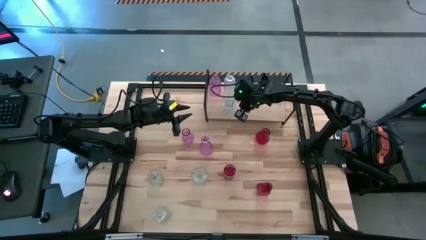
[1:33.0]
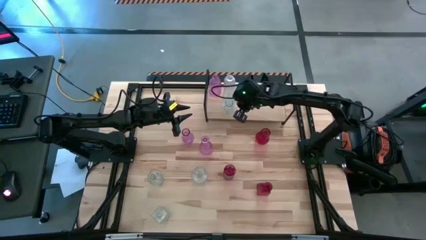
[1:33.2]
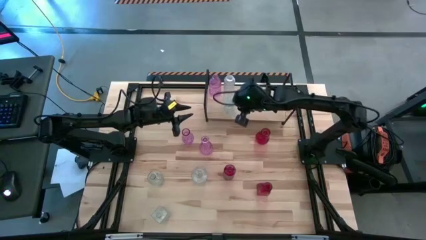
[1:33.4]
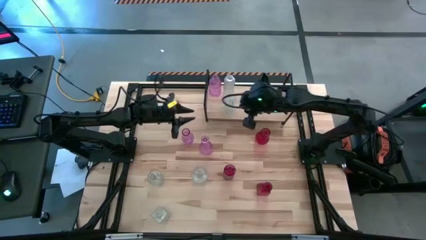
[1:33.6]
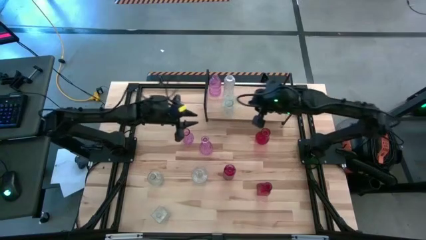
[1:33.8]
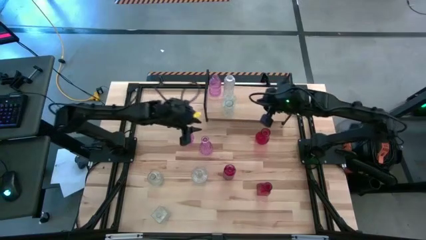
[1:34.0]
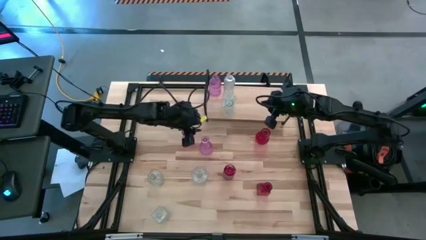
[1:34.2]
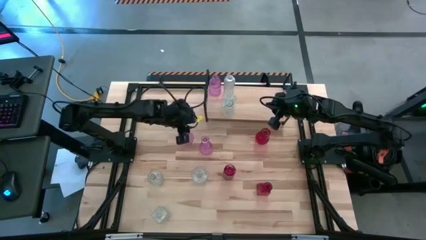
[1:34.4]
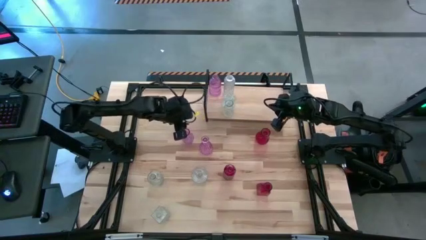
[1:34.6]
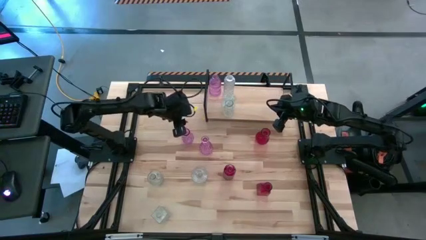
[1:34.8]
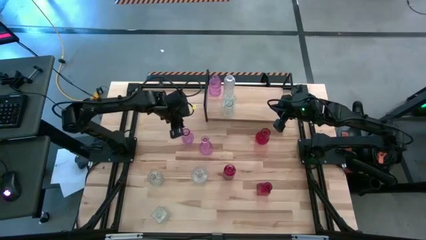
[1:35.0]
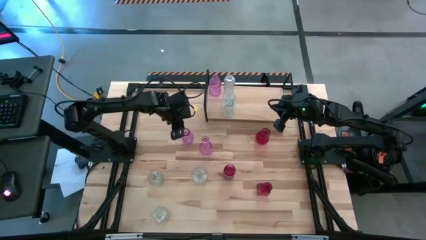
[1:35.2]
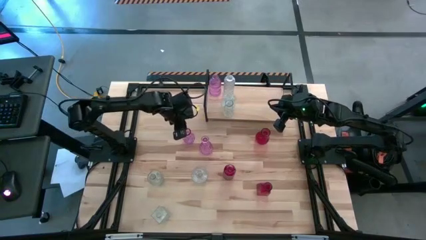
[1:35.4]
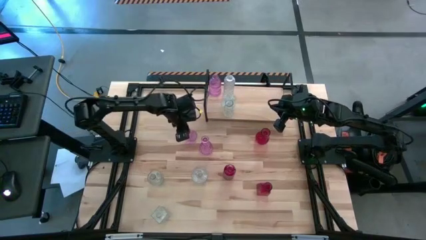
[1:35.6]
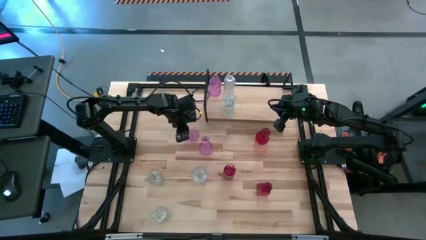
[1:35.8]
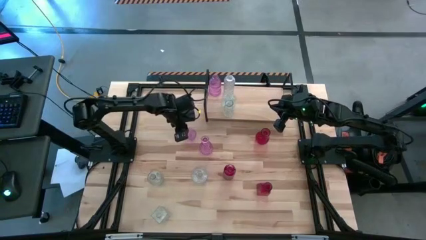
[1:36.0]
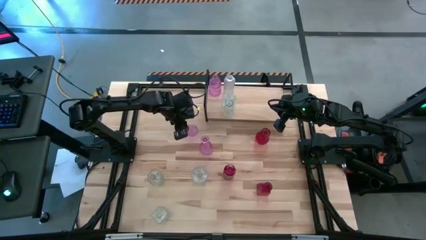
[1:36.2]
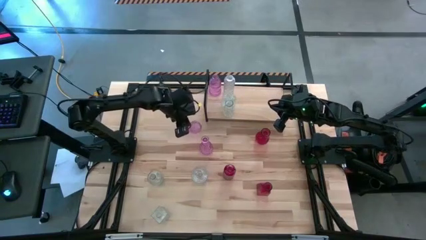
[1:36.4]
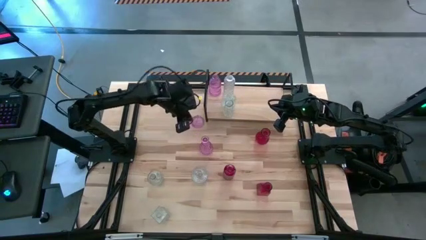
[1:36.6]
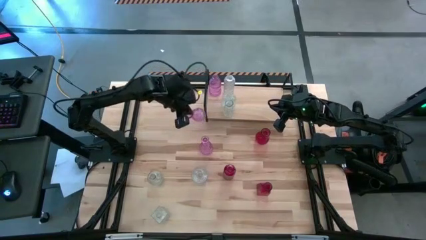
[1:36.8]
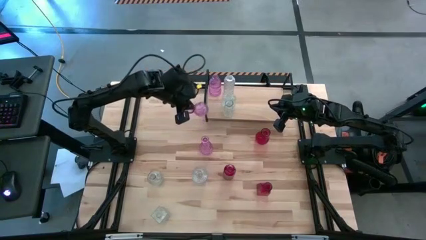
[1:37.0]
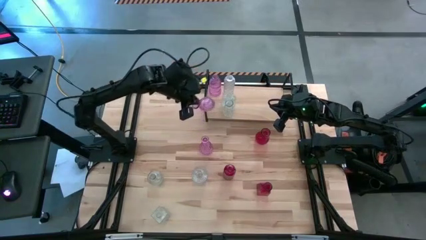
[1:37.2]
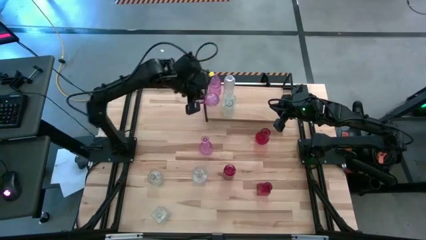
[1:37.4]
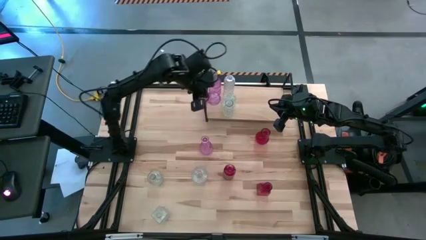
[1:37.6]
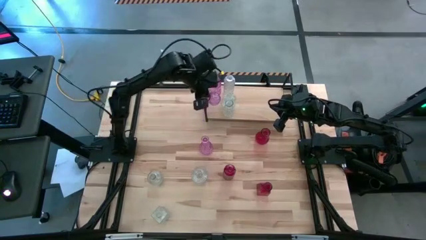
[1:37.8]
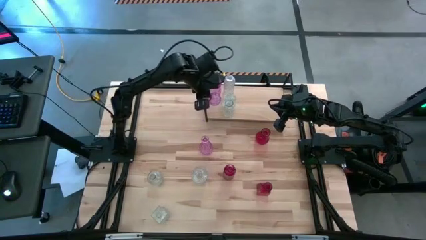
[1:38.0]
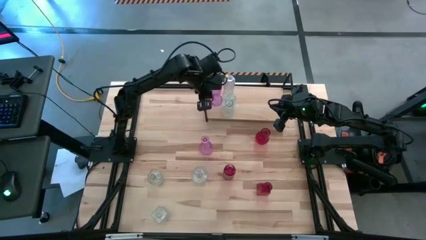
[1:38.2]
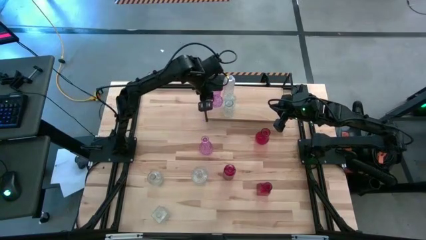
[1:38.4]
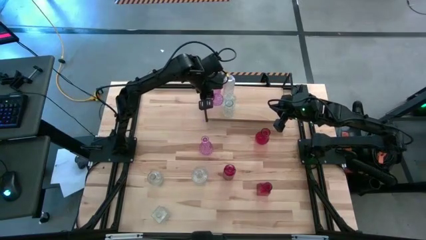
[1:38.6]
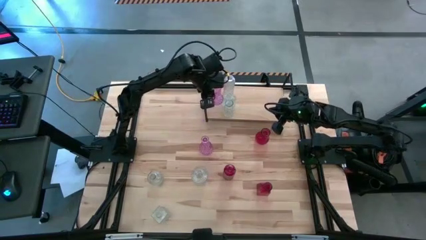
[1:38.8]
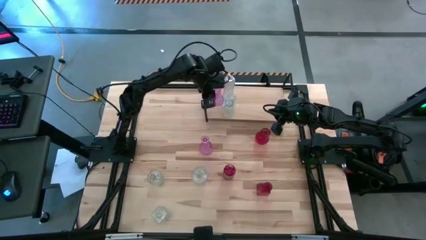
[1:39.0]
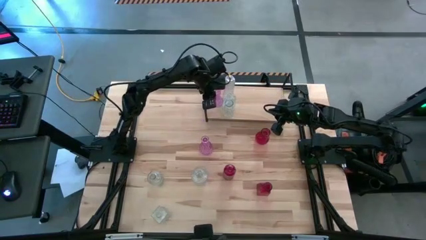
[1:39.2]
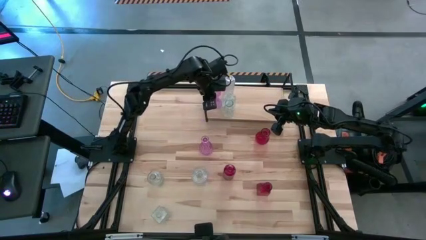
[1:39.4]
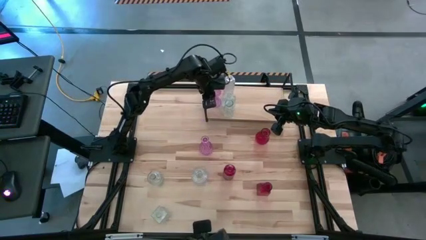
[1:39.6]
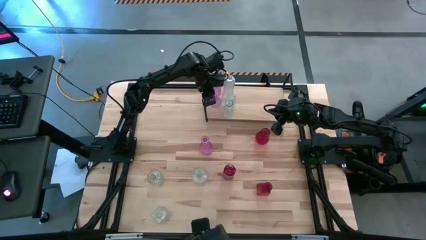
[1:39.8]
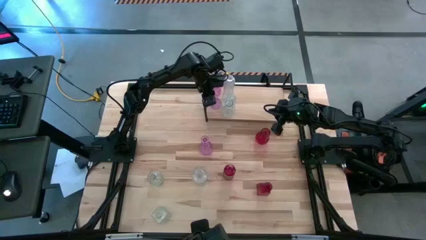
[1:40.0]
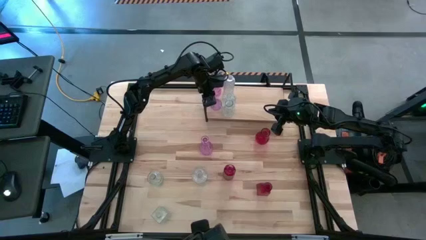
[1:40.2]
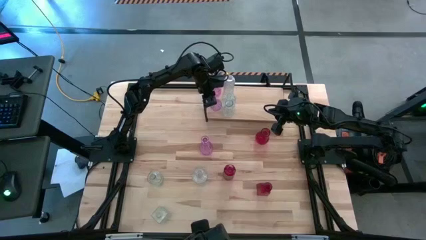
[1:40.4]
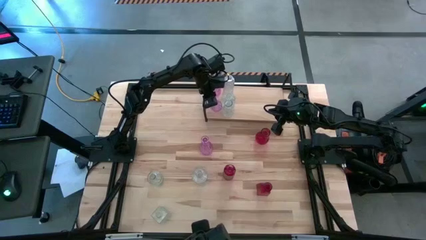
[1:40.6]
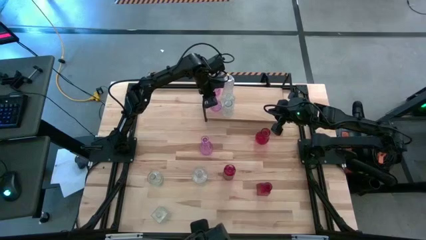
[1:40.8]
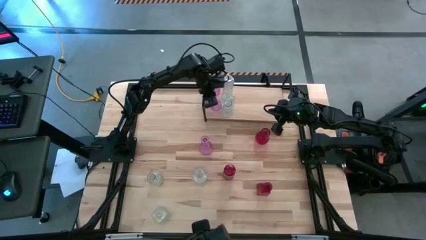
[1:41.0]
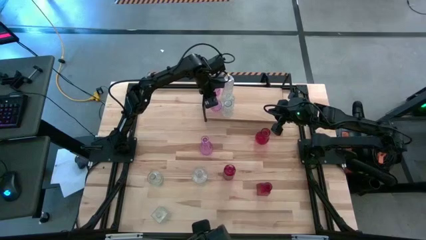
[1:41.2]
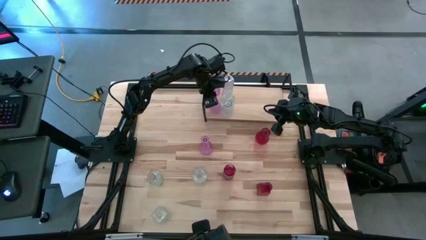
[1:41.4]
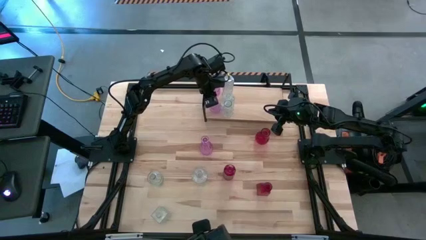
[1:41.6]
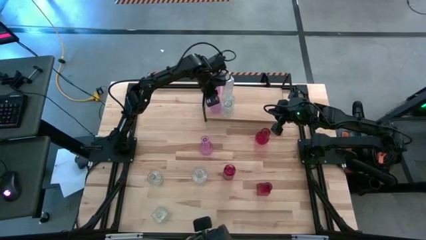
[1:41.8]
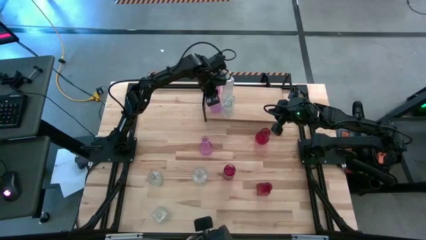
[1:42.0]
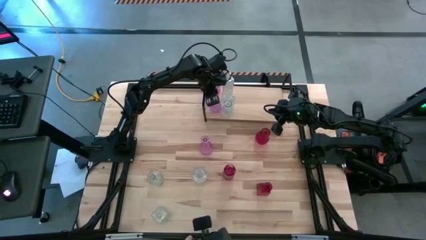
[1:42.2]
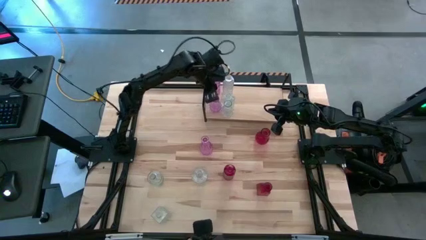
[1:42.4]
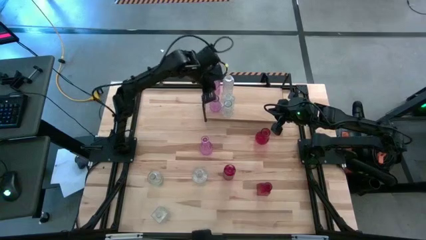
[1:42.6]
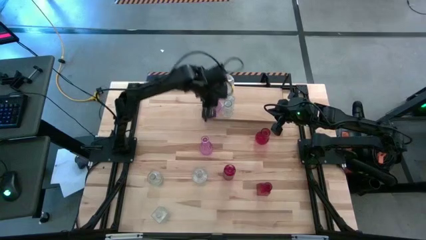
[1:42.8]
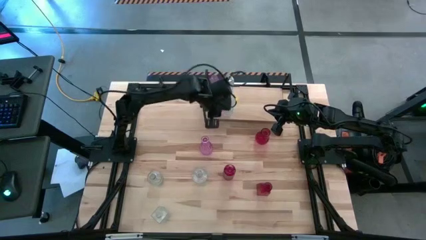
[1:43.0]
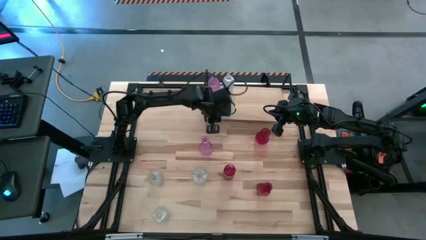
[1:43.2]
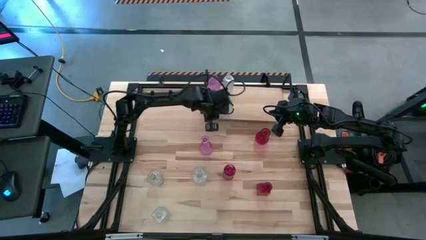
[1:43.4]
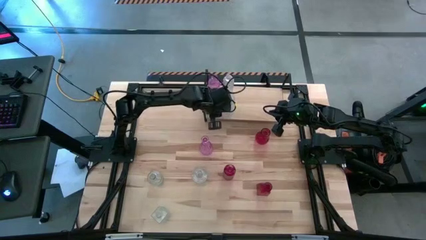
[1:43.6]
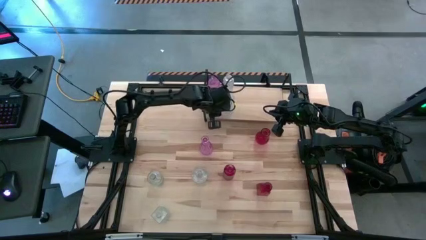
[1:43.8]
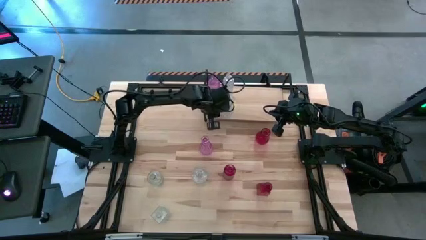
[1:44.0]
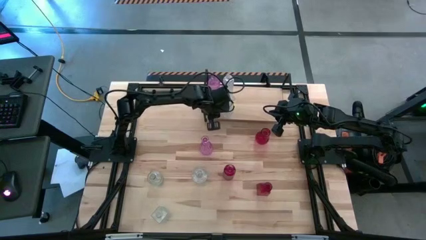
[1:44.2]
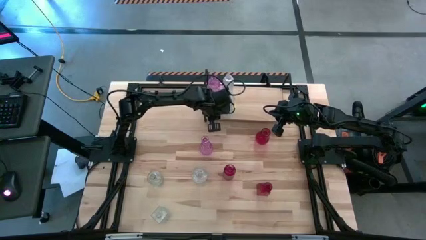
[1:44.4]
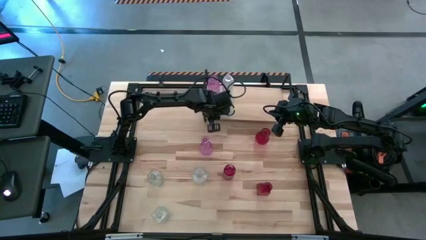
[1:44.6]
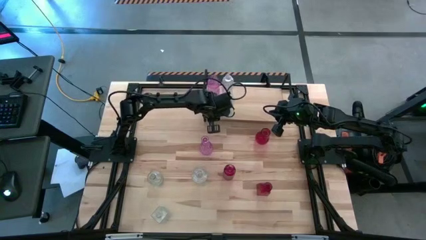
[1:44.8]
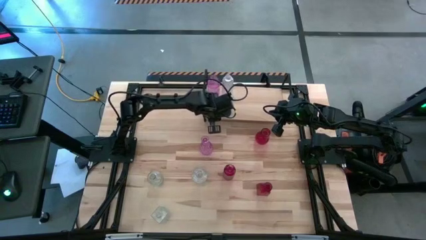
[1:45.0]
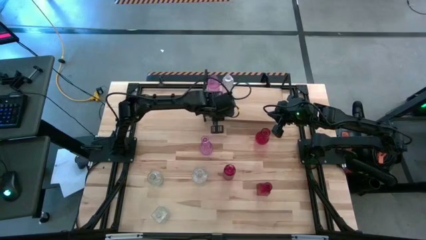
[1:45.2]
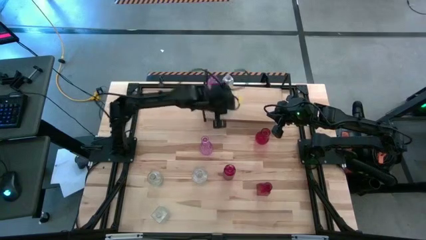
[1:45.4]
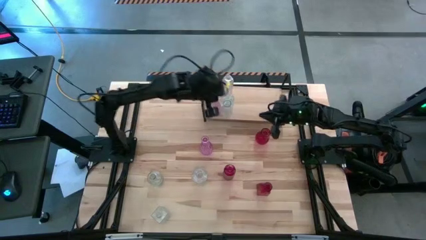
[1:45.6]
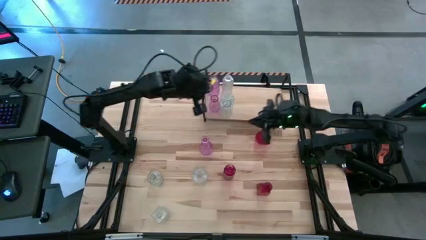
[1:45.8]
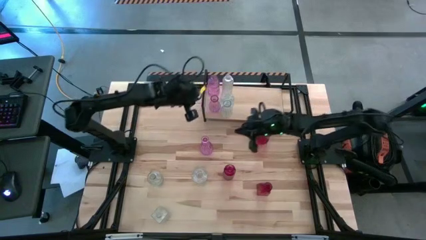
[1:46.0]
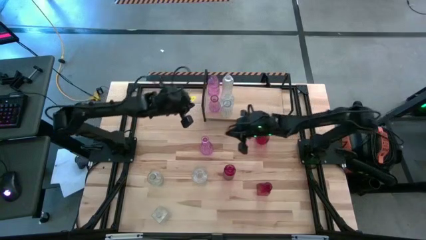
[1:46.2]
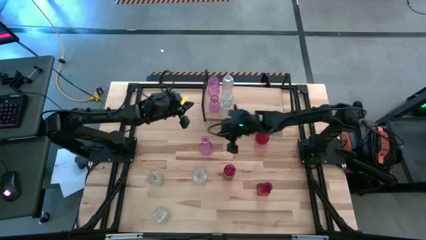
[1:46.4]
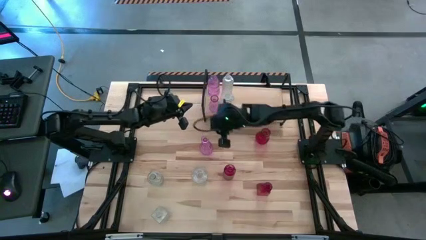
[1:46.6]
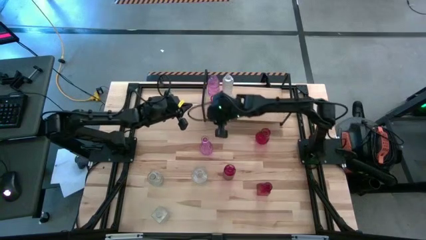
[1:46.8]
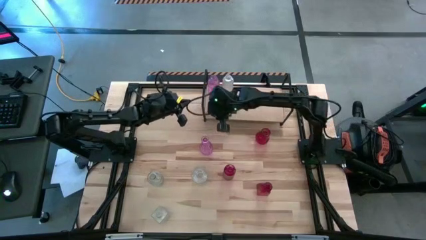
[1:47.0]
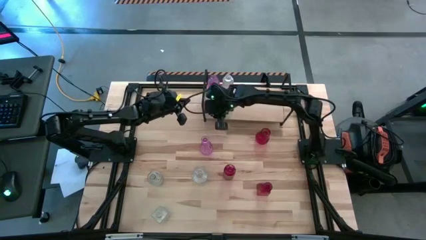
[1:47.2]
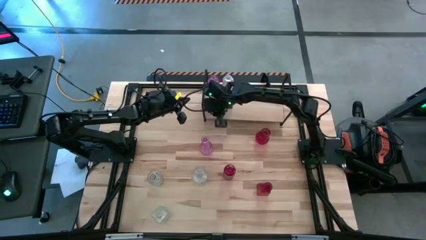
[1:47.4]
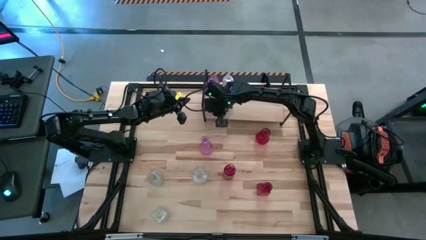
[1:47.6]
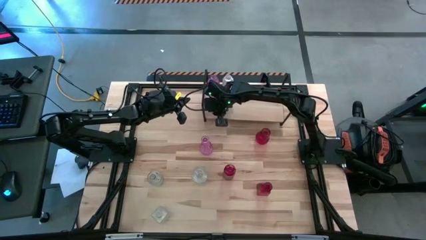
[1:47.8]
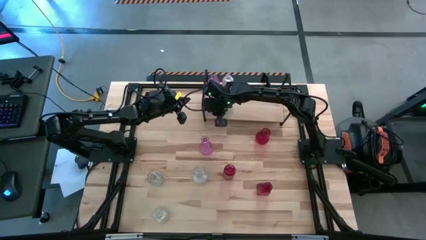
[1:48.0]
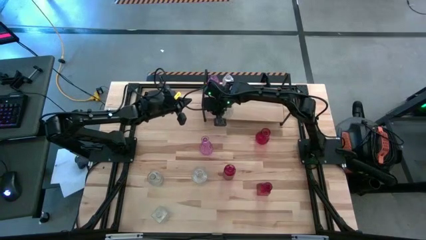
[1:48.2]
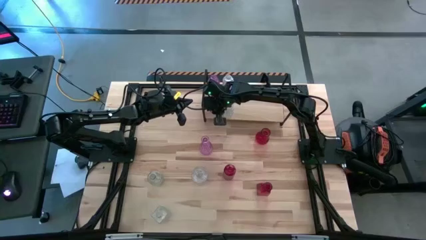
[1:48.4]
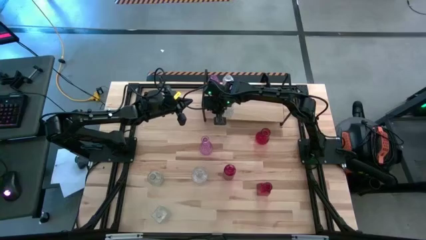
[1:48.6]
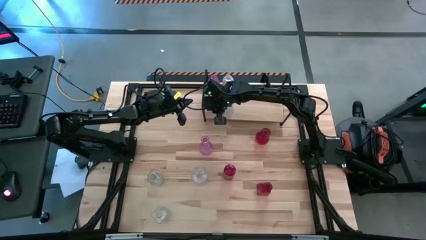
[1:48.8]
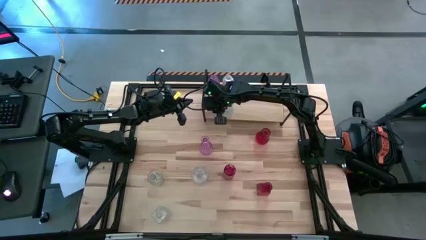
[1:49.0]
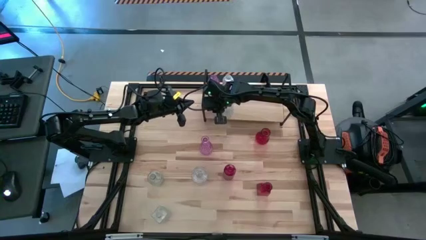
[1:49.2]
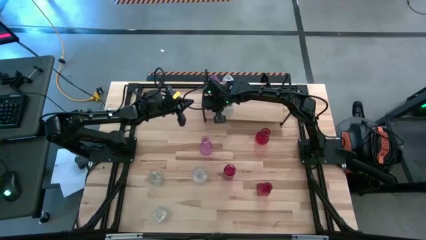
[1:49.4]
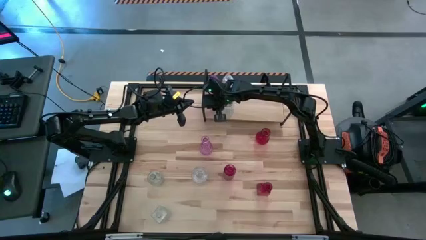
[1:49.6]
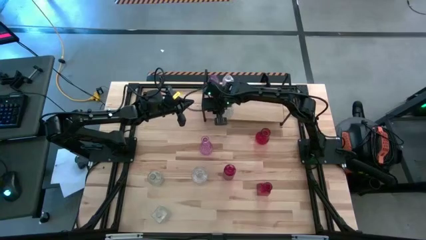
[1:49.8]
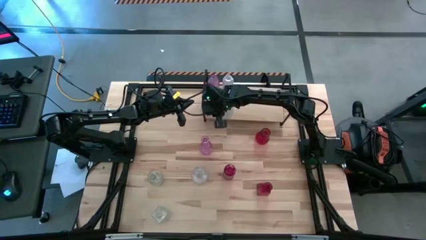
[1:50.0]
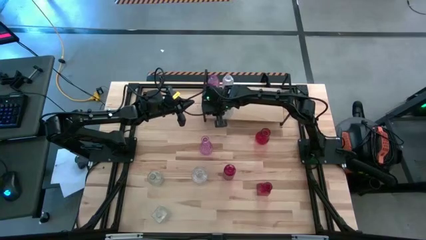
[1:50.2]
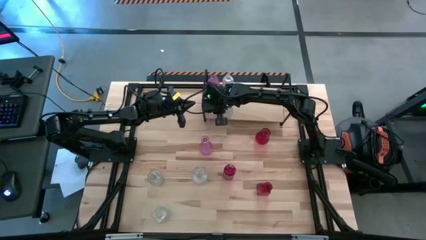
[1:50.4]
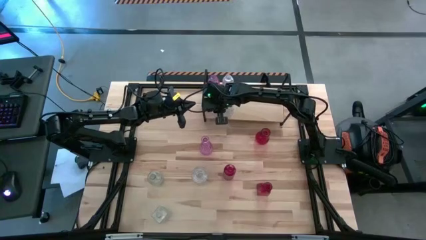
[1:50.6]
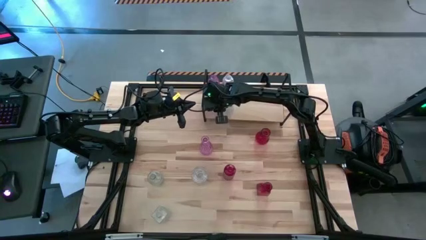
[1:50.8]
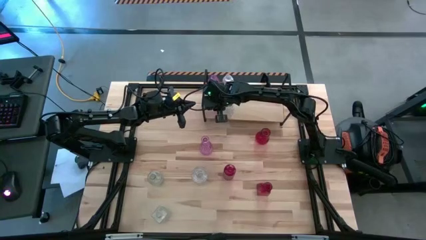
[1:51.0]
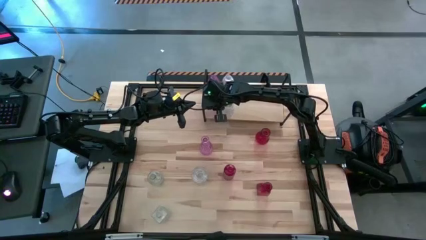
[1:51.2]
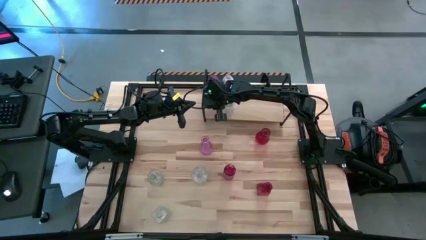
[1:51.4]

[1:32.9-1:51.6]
Task: sort vases onto shelf
Align the violet vase with the other violet vase on the shelf
